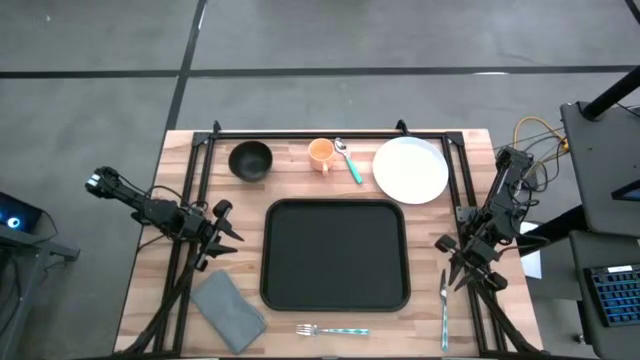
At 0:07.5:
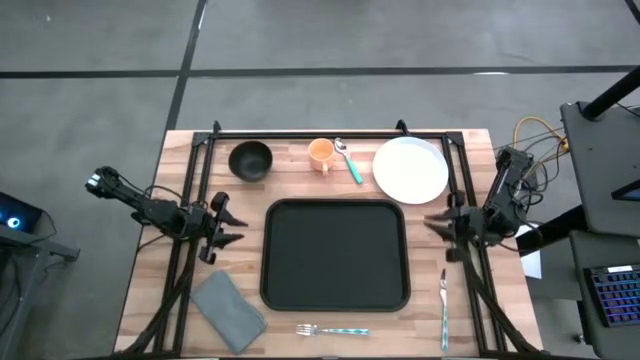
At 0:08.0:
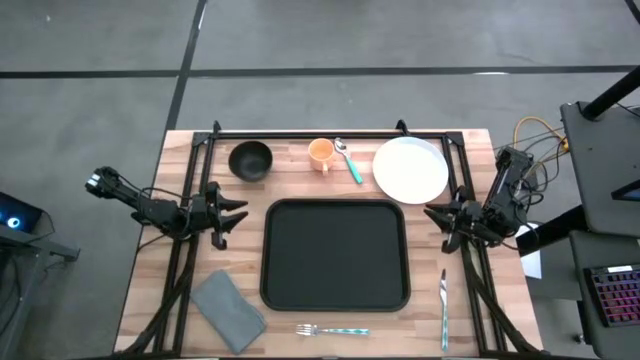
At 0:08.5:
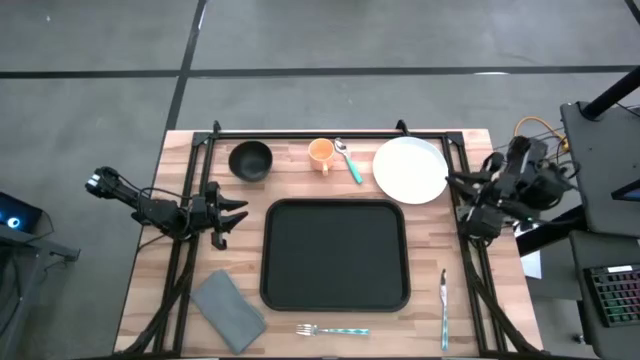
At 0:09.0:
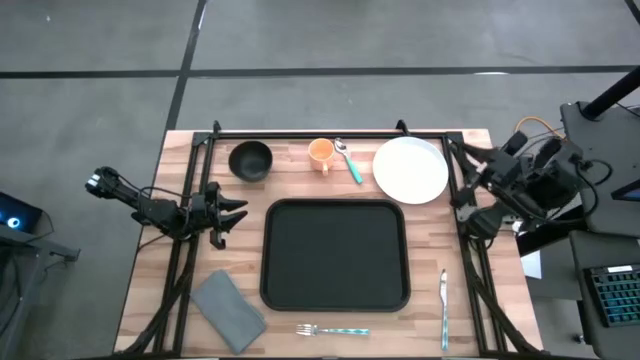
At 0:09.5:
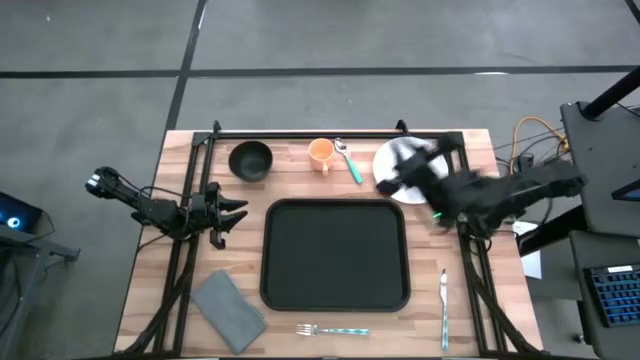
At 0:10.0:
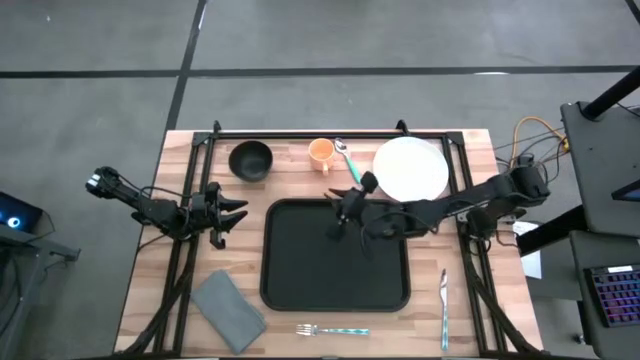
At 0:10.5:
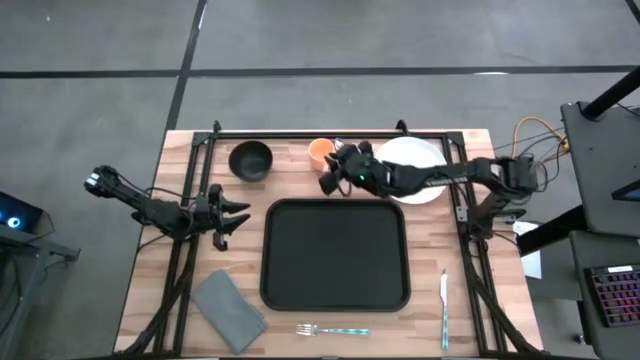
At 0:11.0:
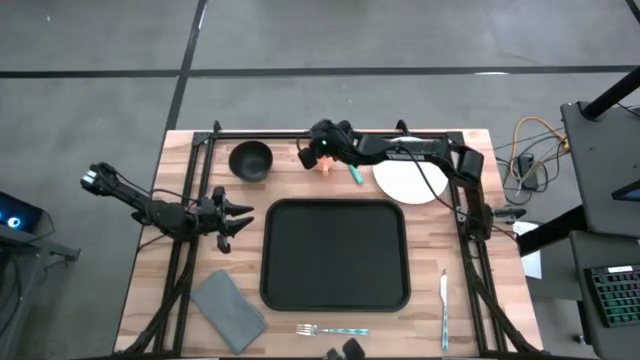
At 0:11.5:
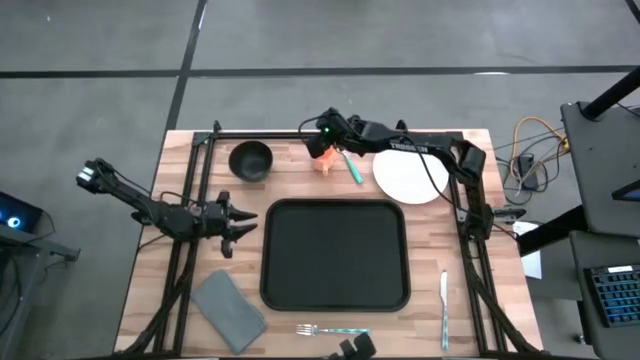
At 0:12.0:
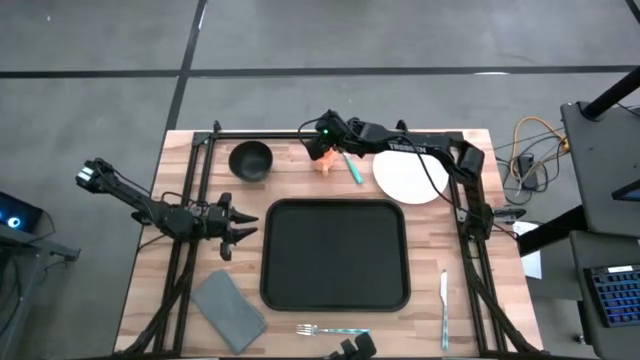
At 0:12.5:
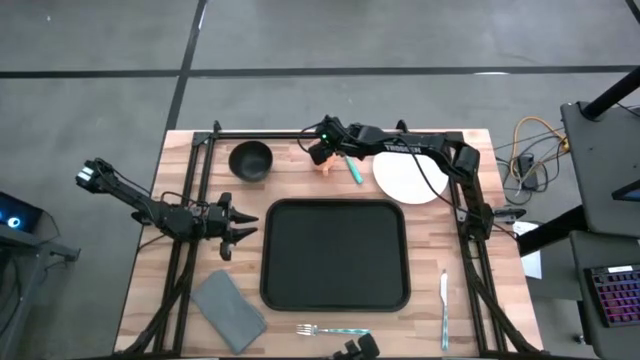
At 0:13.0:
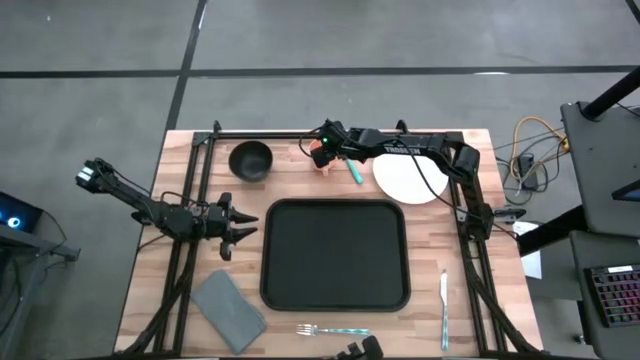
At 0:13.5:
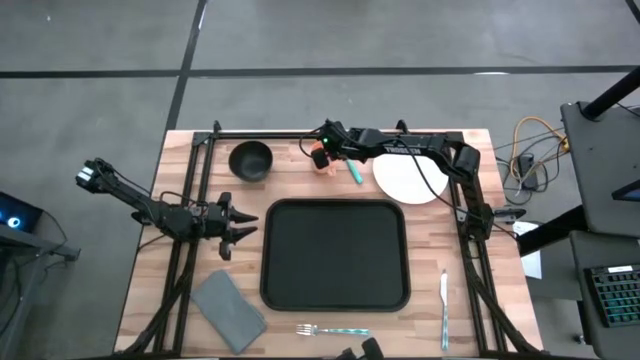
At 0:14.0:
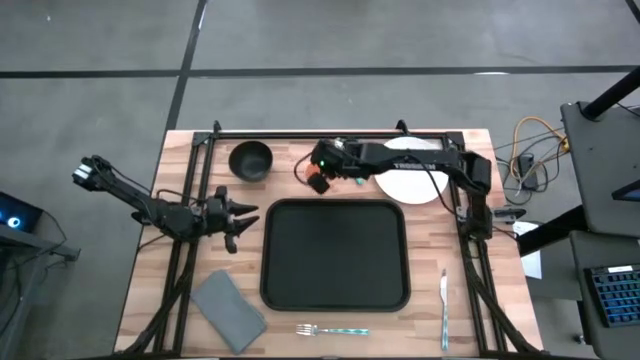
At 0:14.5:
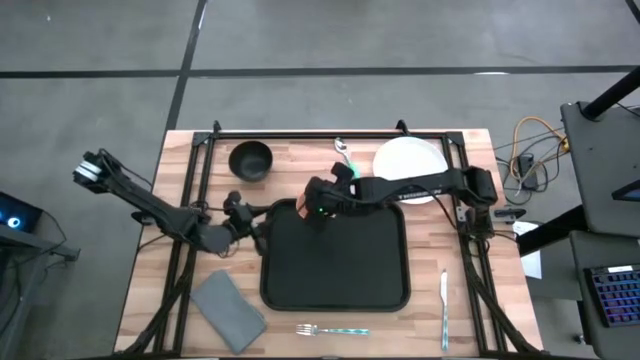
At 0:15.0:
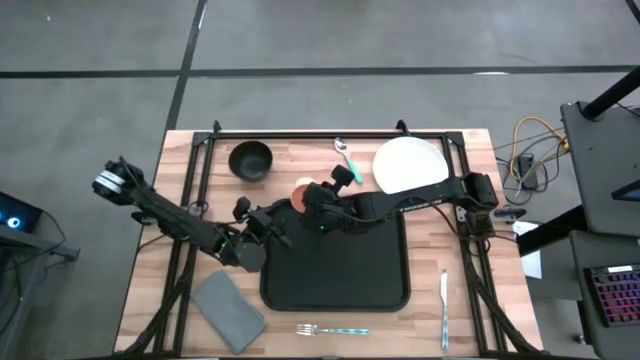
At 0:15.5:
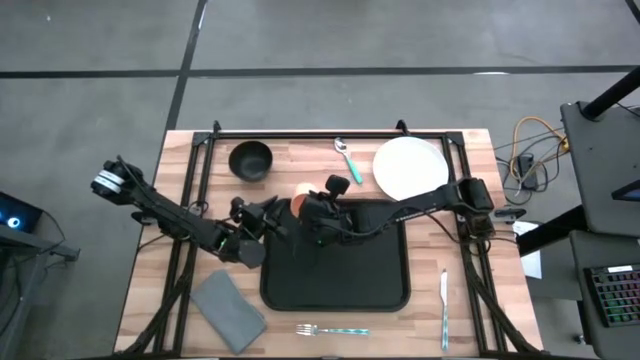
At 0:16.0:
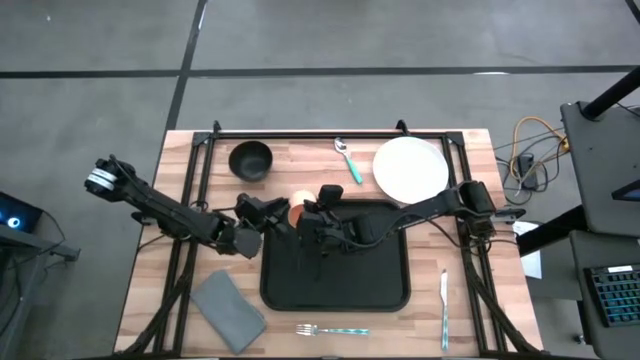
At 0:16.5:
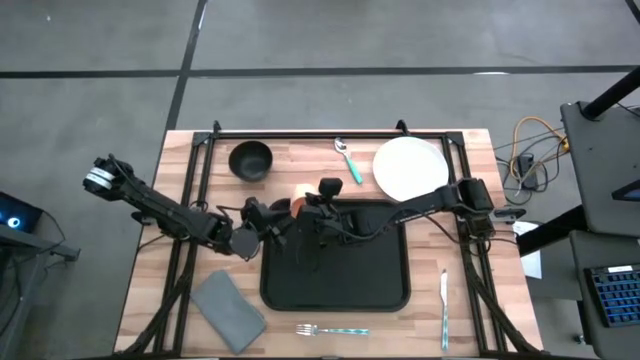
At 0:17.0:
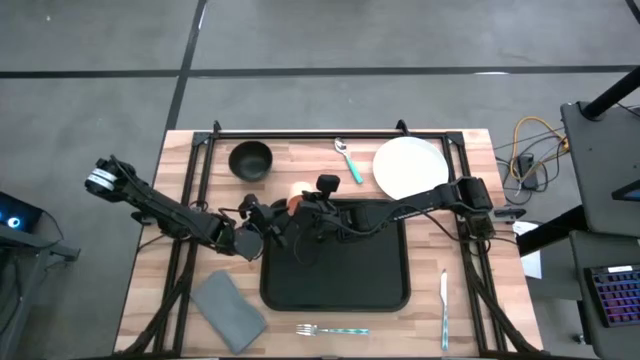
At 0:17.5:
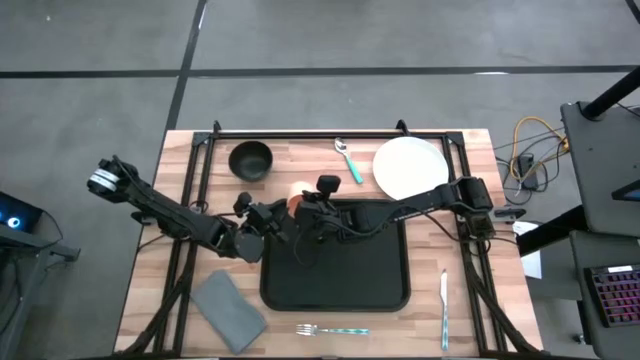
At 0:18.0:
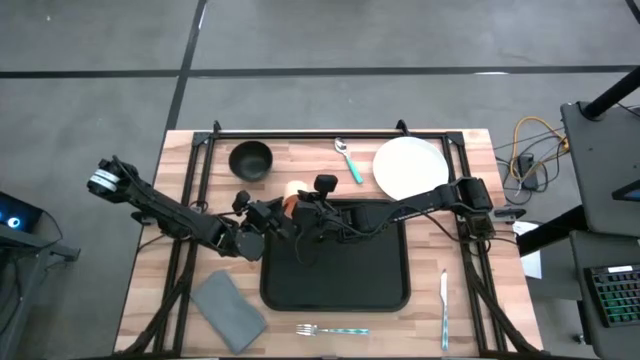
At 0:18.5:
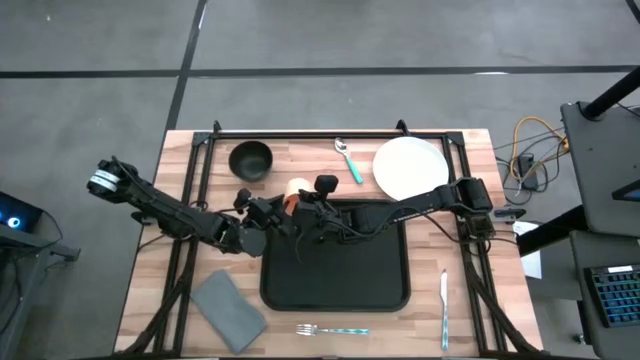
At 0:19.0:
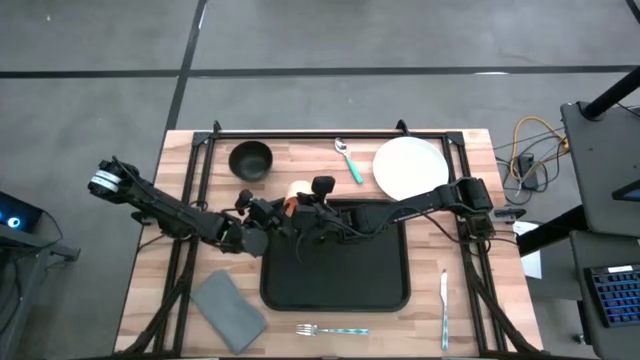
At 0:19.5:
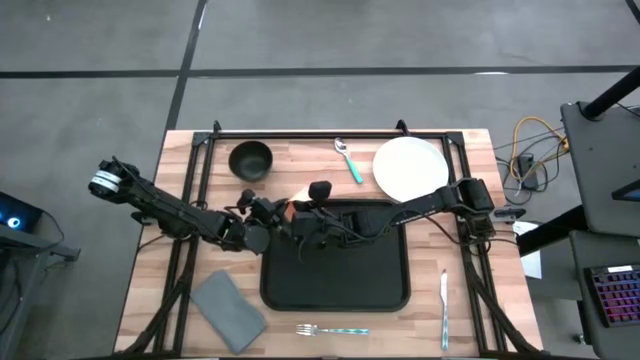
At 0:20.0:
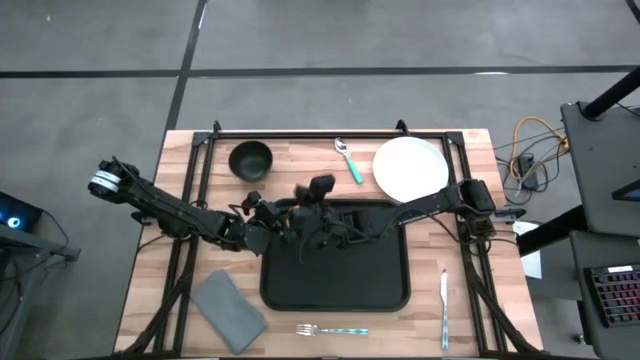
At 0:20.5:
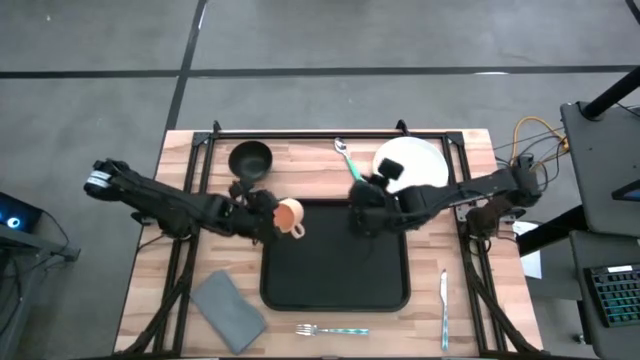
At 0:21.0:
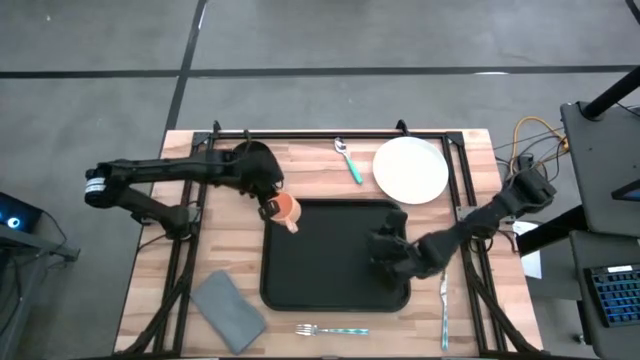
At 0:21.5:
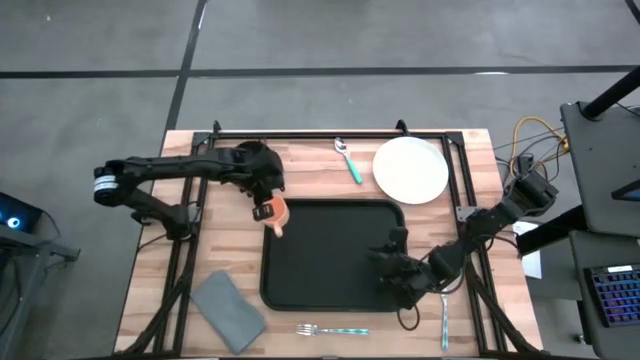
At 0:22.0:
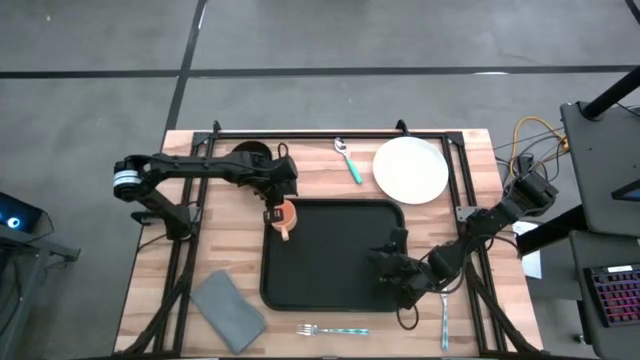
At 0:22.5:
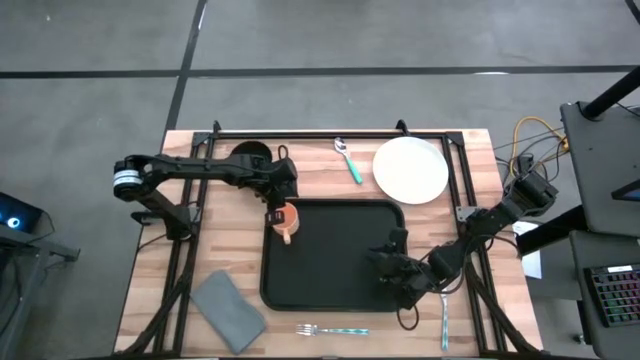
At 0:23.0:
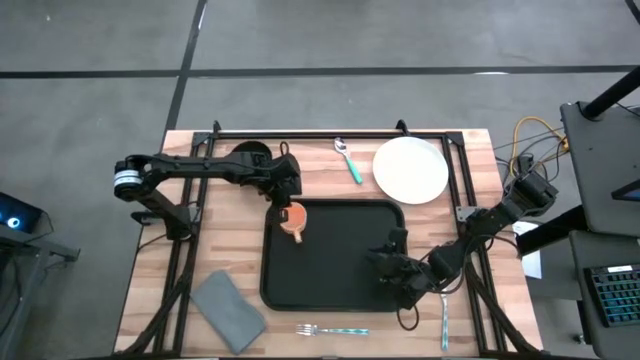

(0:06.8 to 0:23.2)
Task: Set up tray
Put the yellow mug on the top left of the black tray

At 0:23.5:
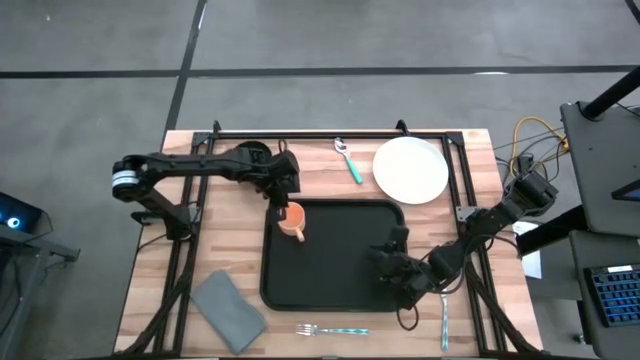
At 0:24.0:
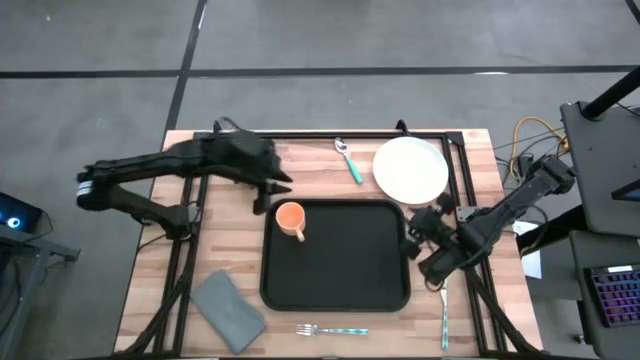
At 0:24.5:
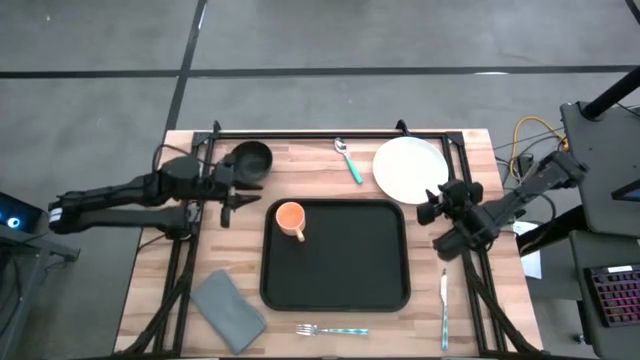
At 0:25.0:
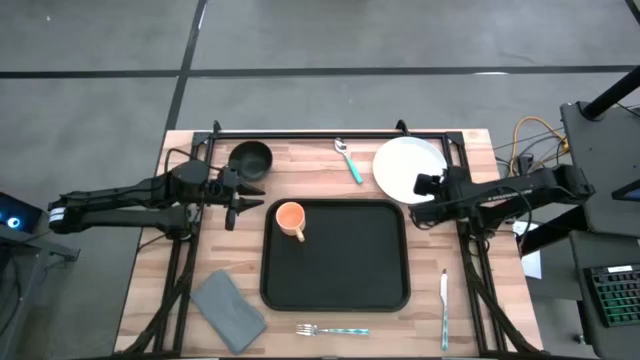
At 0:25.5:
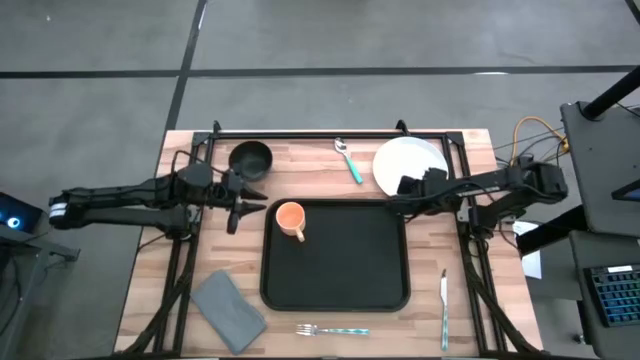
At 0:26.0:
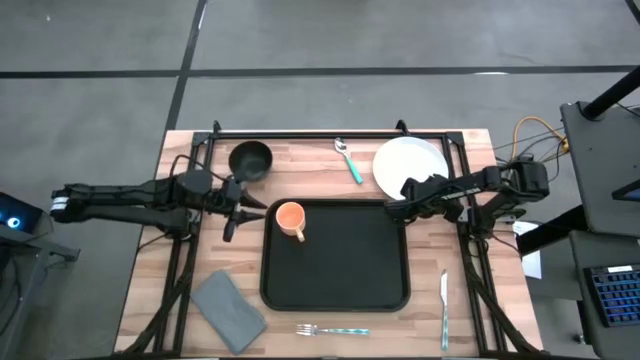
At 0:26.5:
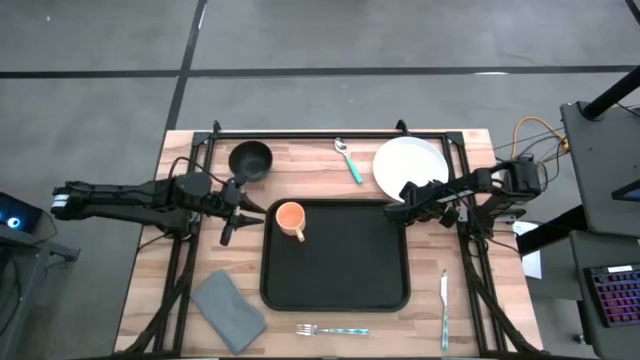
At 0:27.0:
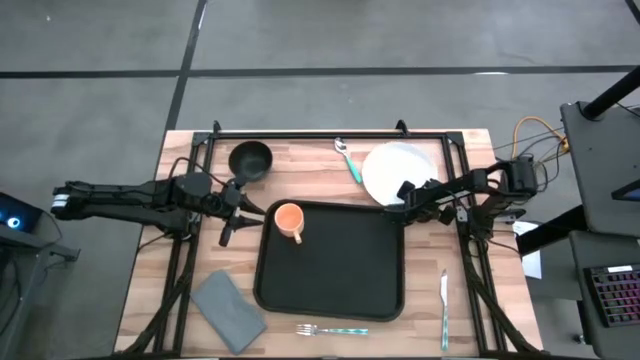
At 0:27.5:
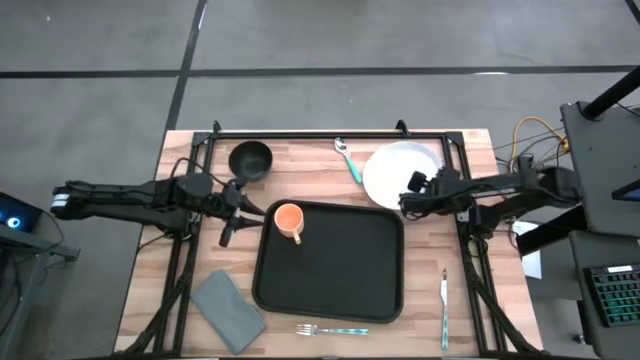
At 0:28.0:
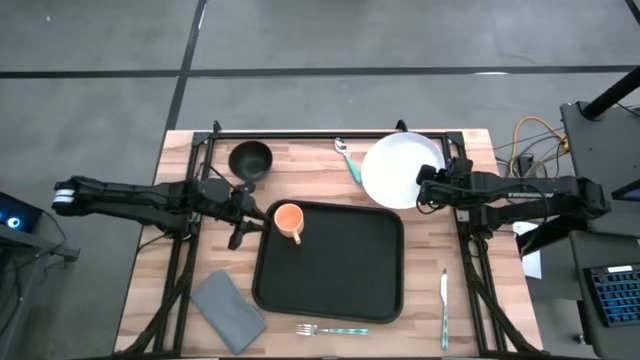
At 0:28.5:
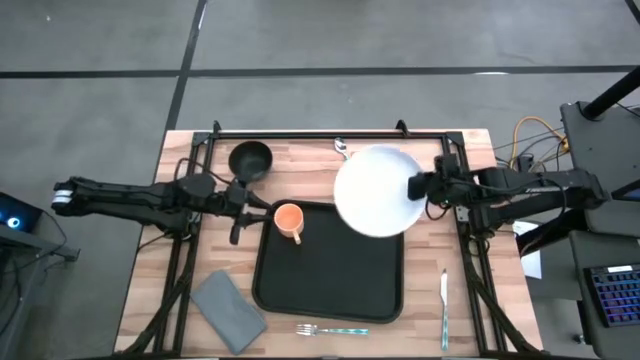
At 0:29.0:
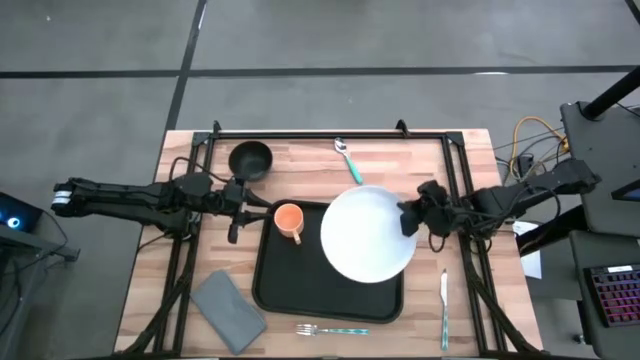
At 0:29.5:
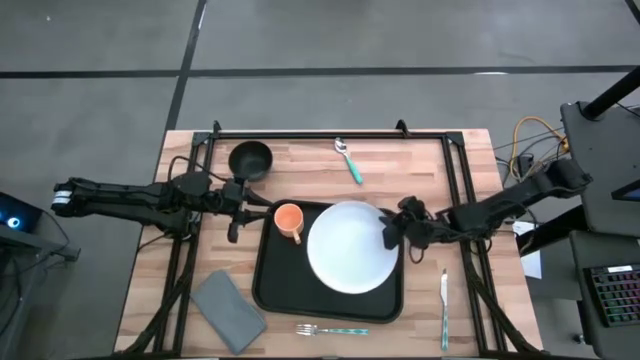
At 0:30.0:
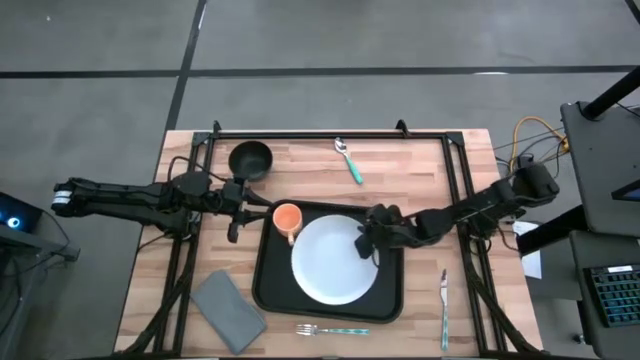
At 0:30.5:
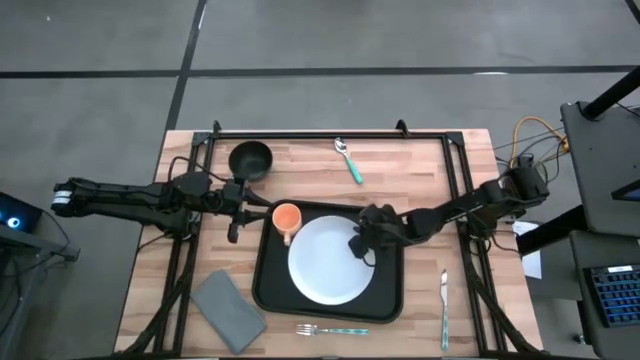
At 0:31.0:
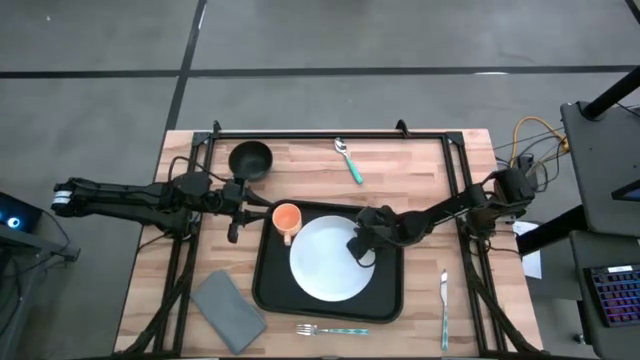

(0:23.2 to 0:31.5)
Put the white plate on the black tray below the orange mug
